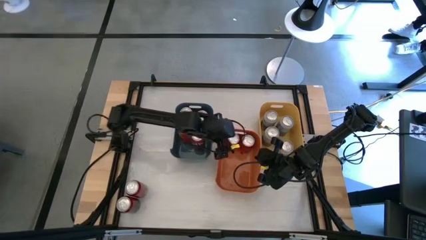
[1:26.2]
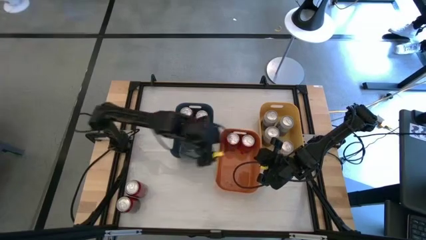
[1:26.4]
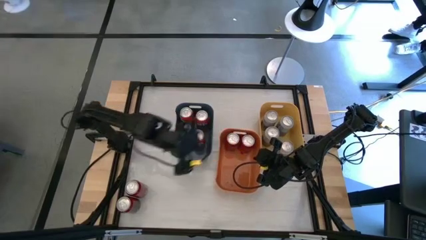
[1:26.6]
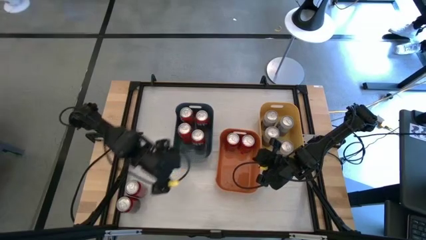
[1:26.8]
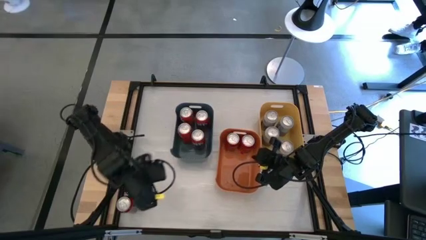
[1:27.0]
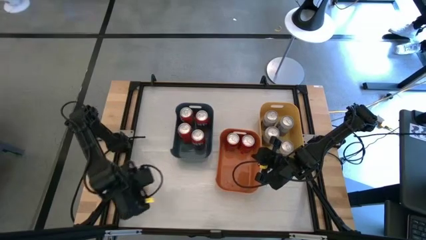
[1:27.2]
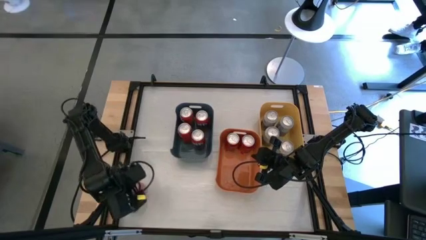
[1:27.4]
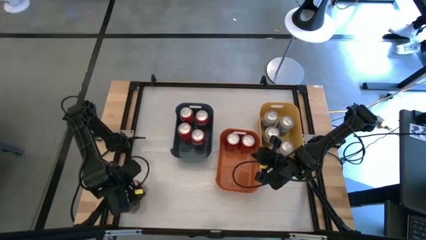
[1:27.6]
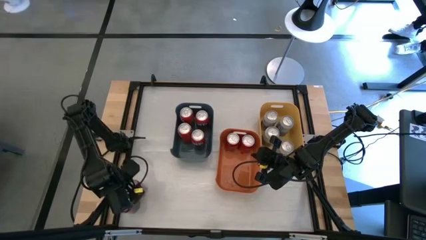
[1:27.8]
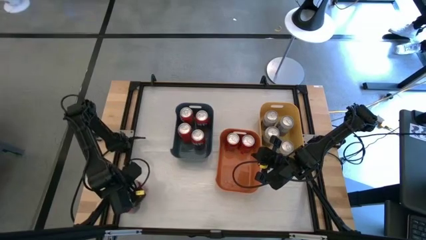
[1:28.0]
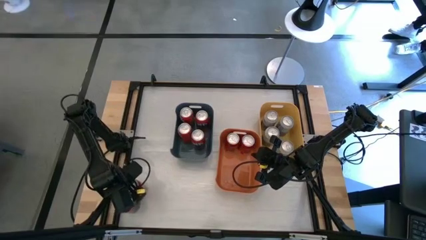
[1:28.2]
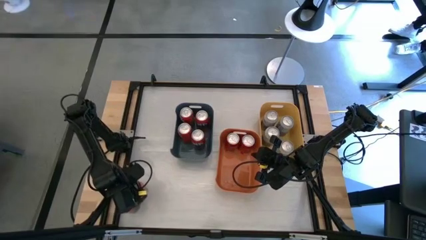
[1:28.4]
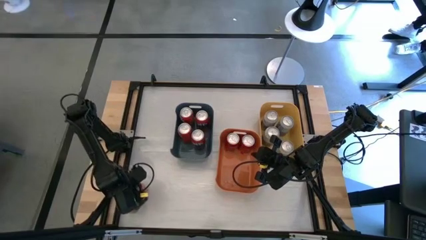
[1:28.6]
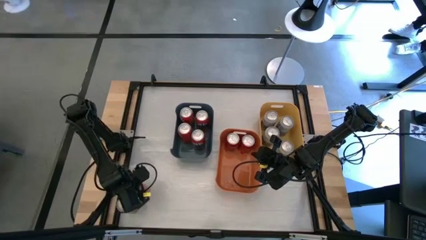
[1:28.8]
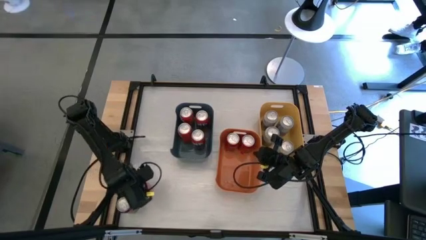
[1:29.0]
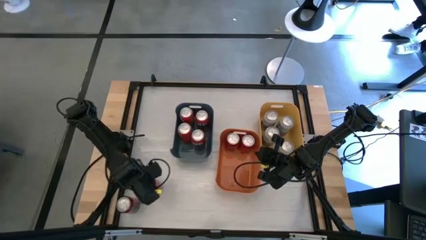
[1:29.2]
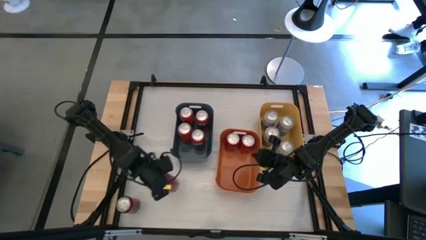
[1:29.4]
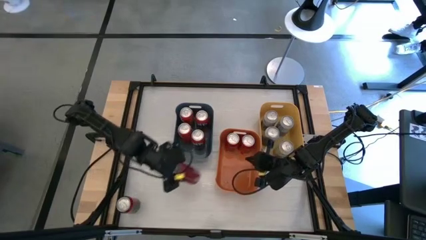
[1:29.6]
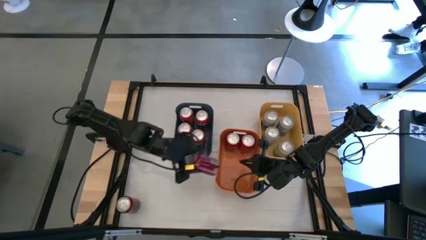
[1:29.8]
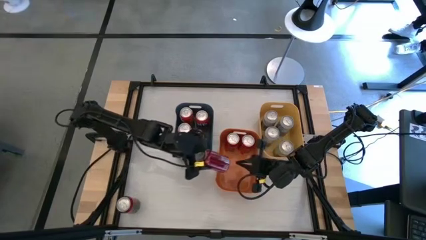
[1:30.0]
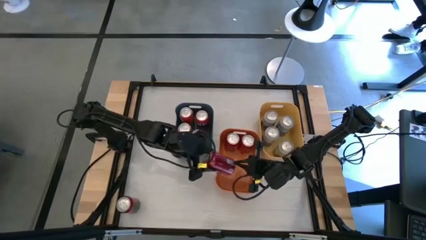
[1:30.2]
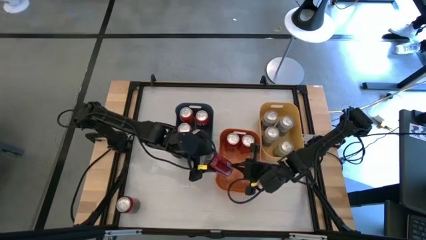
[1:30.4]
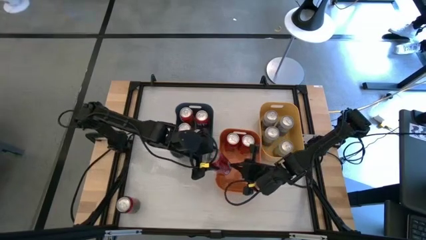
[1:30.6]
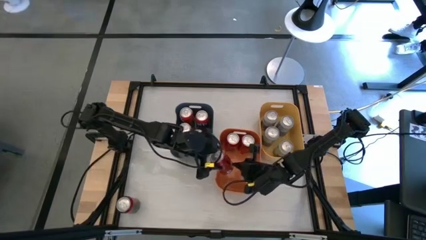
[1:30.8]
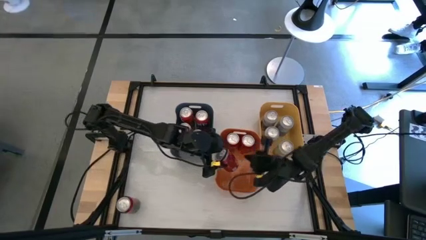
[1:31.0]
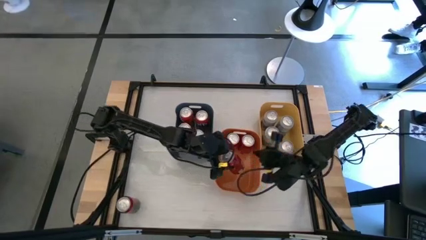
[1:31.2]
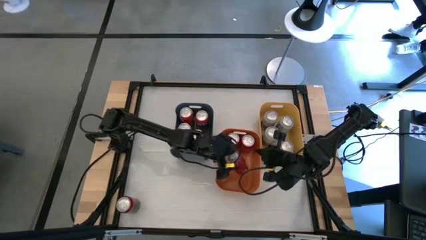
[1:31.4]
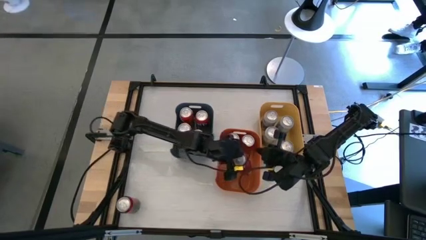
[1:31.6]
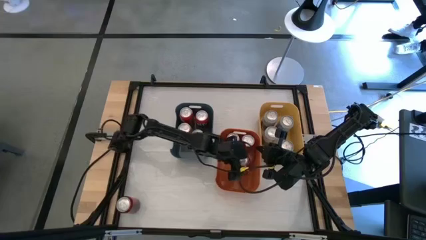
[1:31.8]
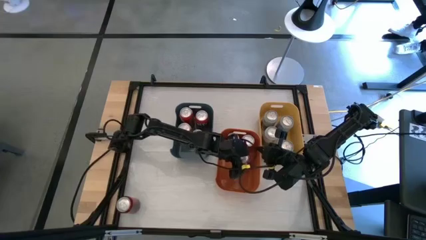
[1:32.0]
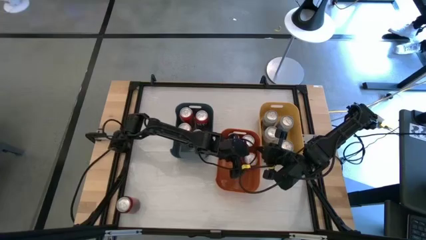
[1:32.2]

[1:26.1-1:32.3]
Task: Sort soda cans
Put the top red soda can into the orange bin

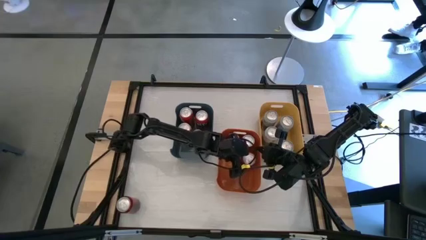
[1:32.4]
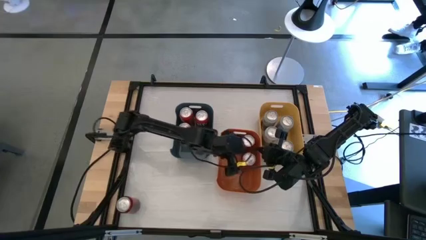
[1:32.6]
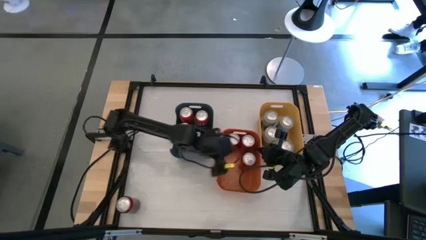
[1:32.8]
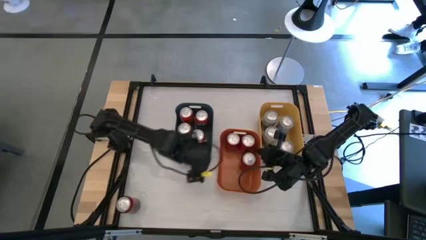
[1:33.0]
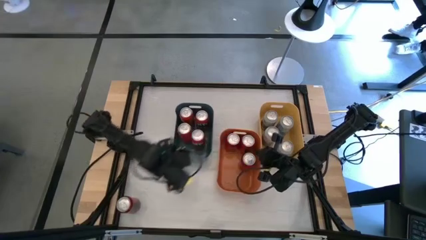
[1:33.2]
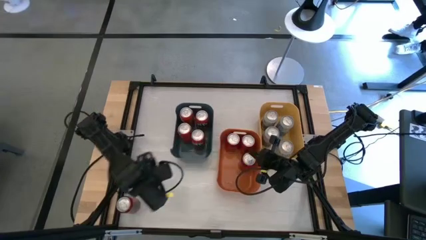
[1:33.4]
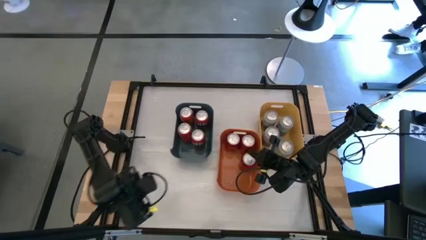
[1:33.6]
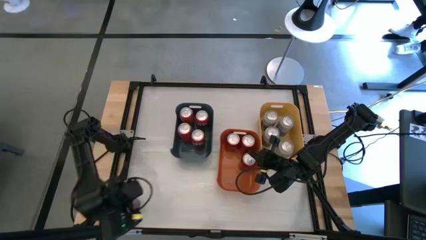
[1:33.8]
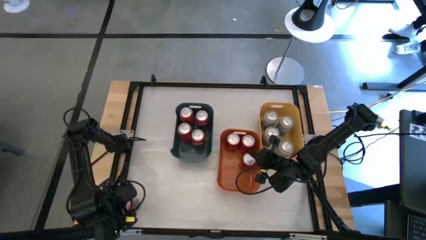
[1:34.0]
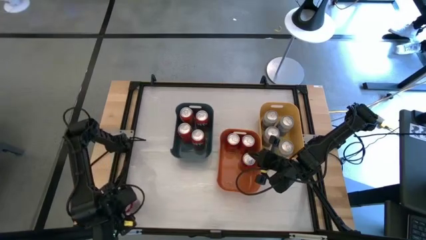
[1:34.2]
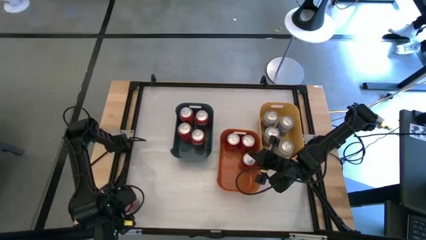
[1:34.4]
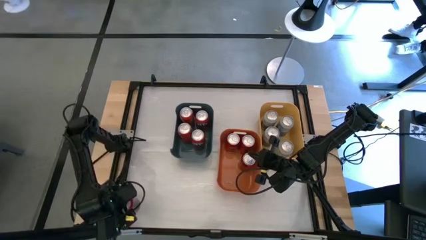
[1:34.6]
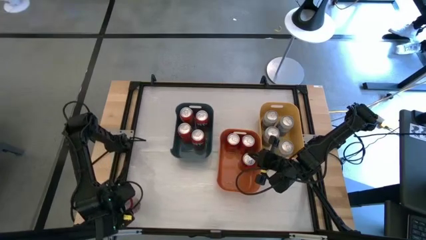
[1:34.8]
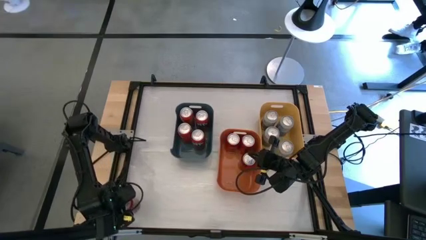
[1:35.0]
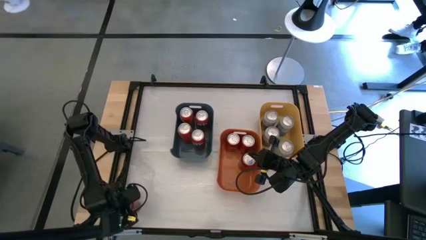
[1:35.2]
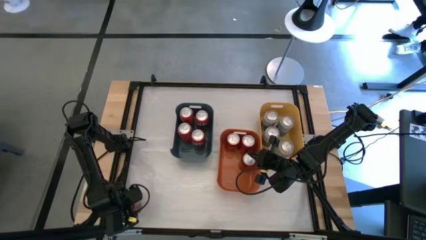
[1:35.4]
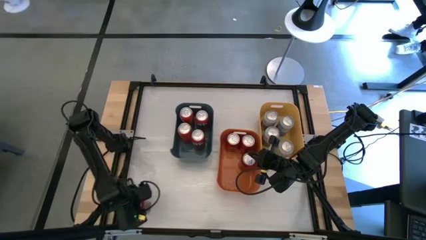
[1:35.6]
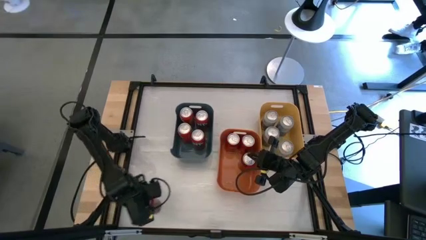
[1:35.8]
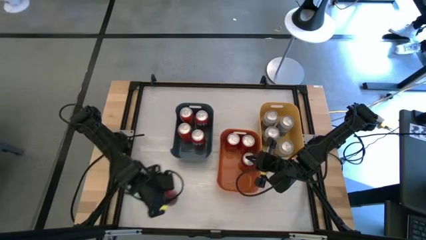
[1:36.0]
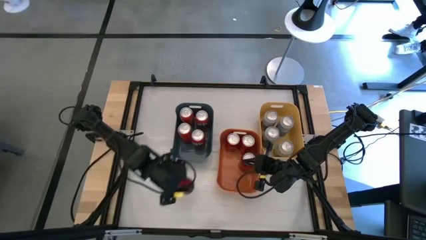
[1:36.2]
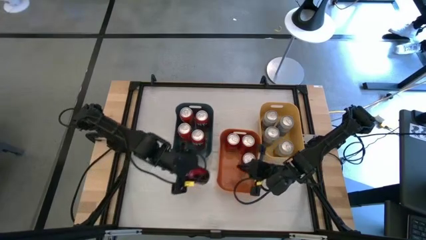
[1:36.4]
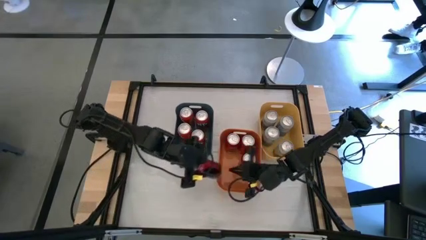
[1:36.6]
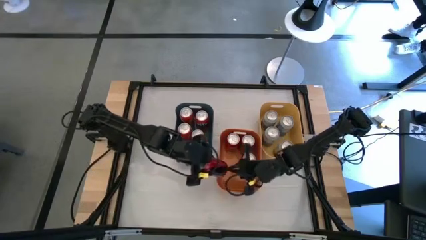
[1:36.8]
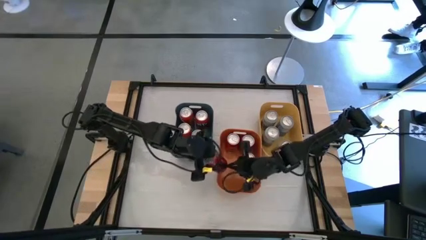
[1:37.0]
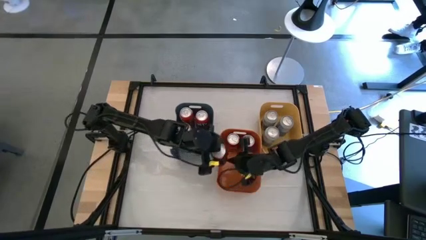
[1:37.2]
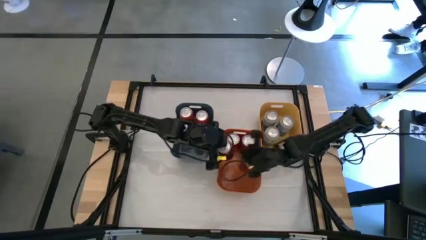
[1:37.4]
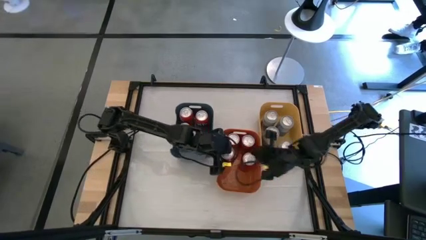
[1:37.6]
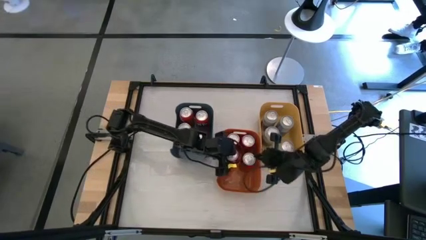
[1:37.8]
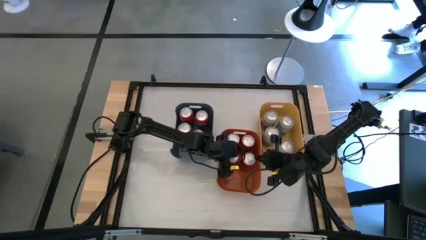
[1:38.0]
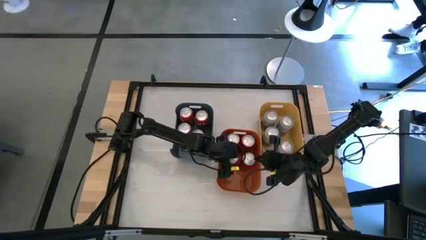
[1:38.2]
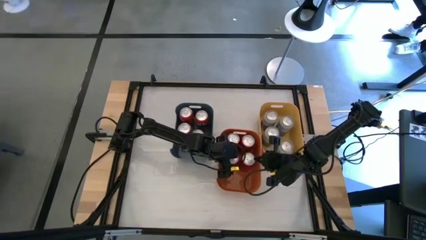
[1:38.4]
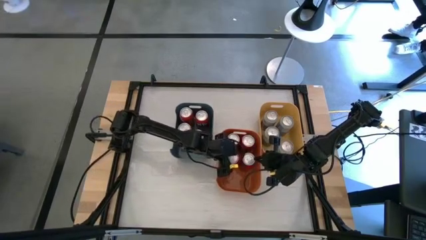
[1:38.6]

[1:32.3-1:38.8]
Put the red soda can into the orange bin
